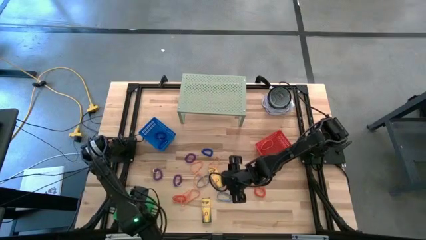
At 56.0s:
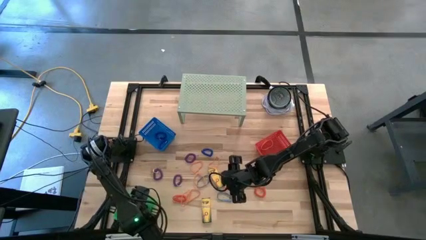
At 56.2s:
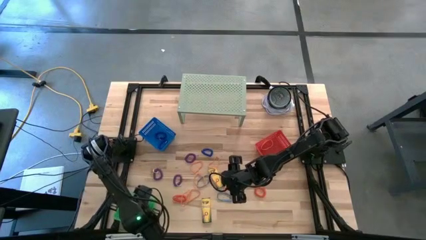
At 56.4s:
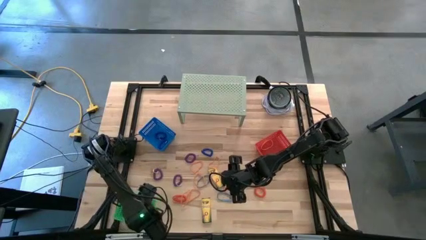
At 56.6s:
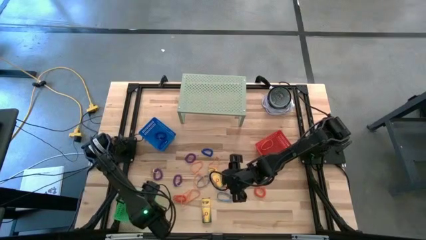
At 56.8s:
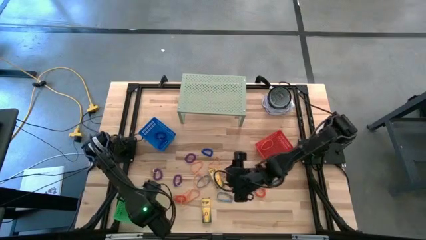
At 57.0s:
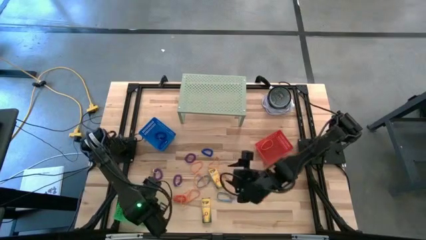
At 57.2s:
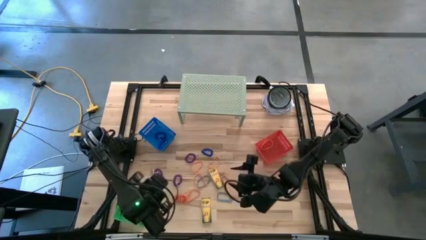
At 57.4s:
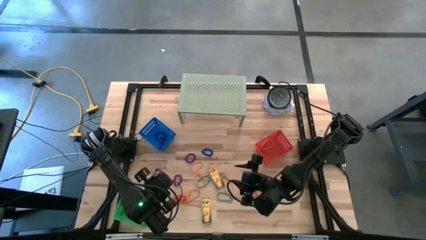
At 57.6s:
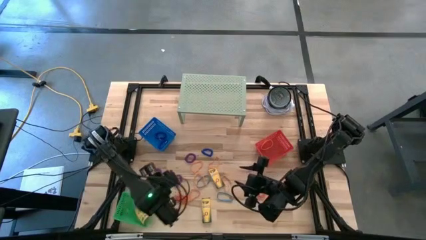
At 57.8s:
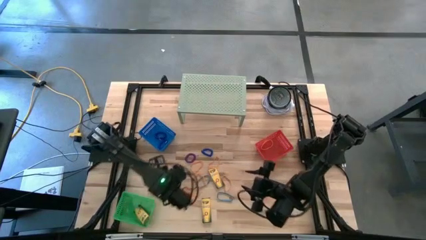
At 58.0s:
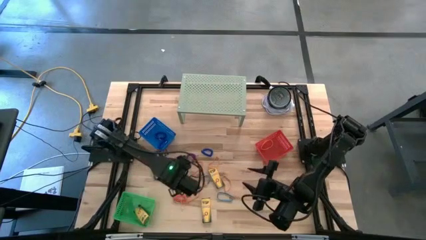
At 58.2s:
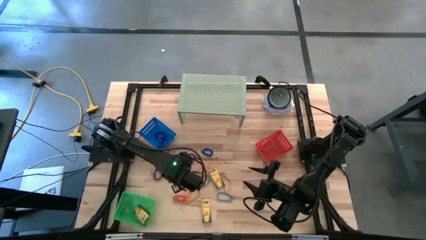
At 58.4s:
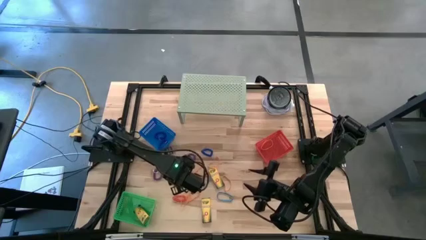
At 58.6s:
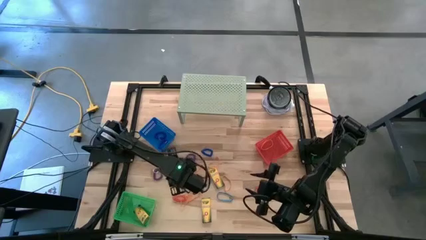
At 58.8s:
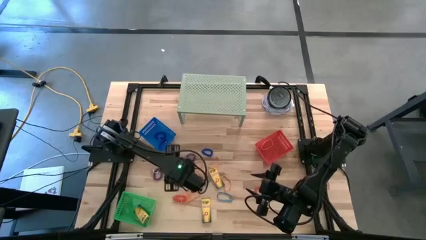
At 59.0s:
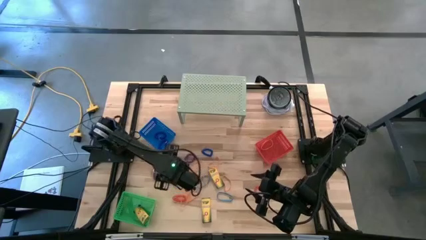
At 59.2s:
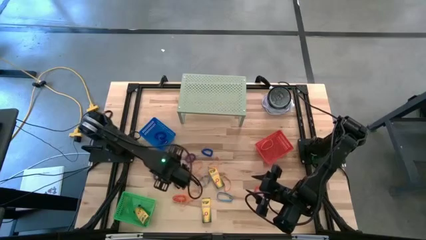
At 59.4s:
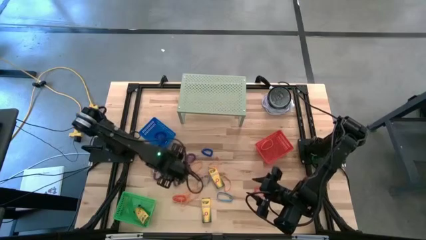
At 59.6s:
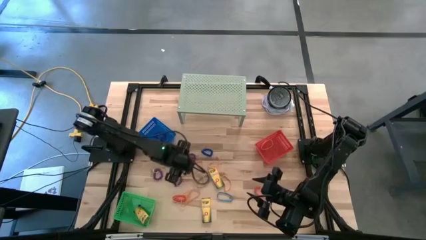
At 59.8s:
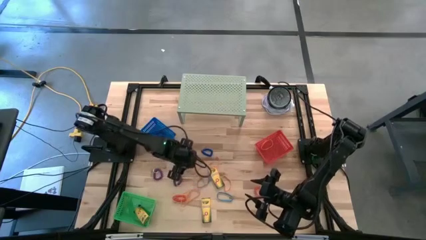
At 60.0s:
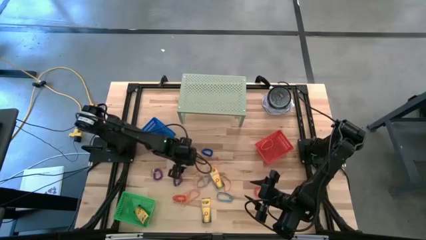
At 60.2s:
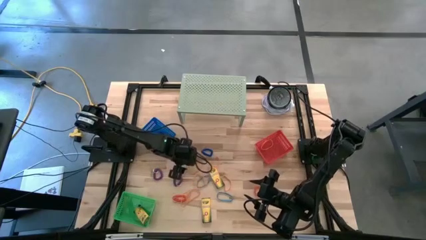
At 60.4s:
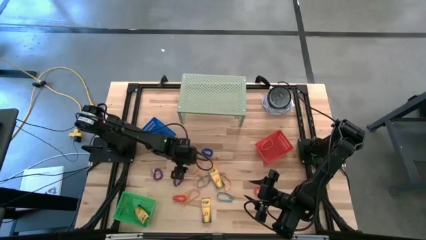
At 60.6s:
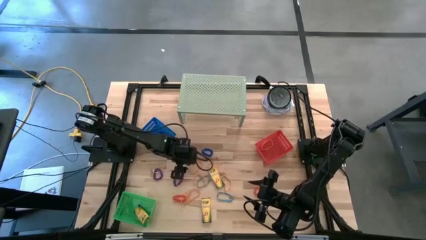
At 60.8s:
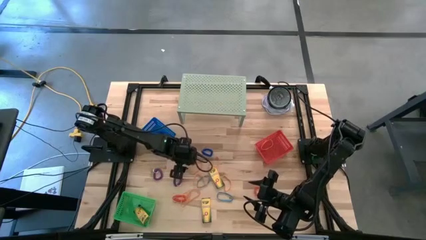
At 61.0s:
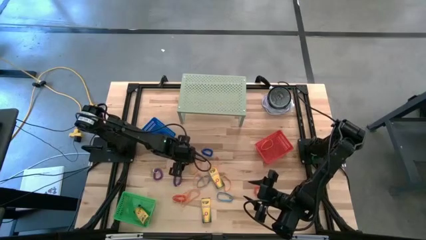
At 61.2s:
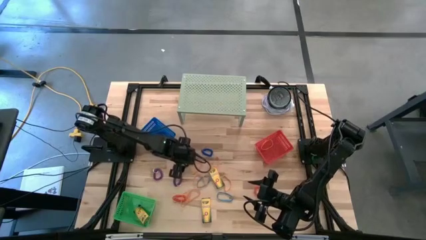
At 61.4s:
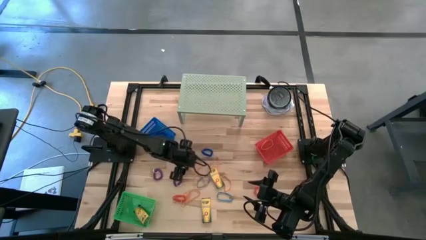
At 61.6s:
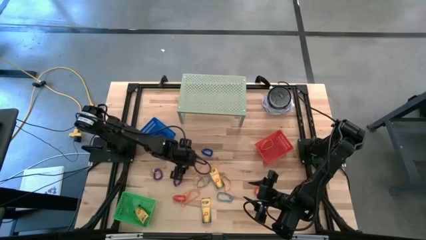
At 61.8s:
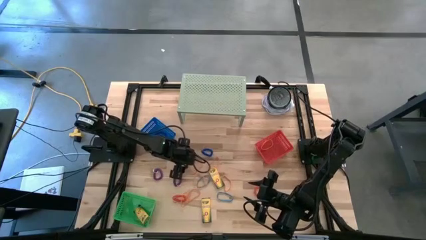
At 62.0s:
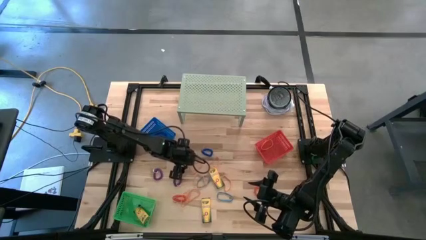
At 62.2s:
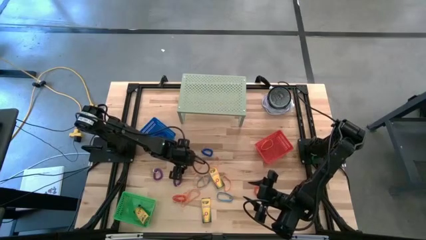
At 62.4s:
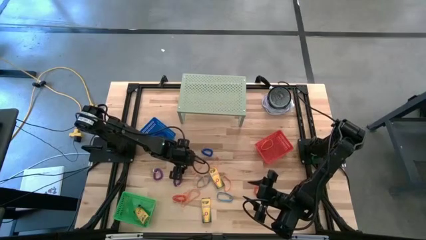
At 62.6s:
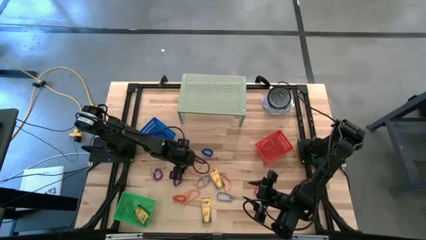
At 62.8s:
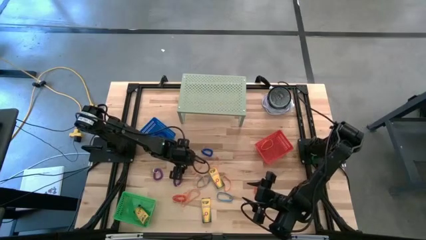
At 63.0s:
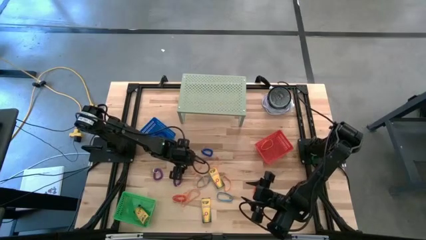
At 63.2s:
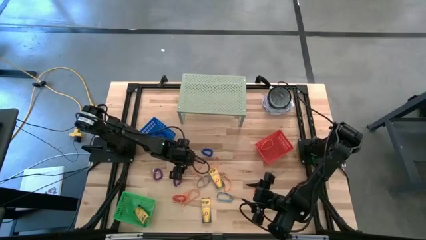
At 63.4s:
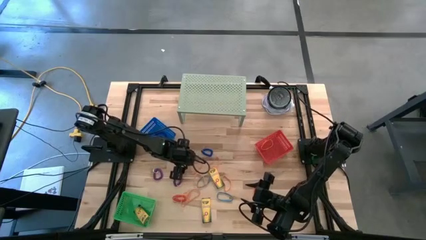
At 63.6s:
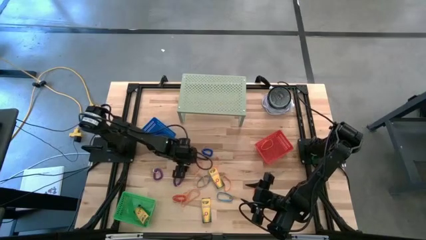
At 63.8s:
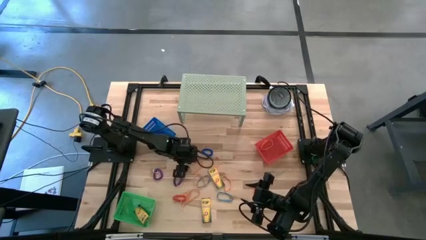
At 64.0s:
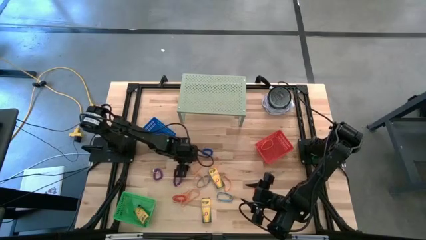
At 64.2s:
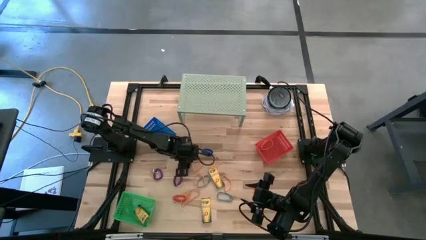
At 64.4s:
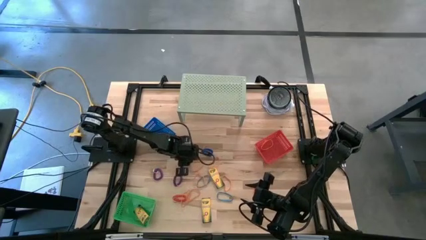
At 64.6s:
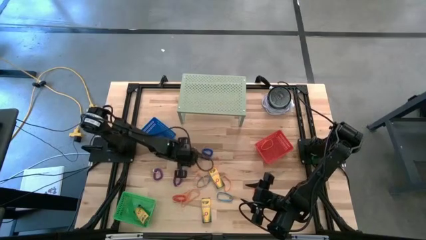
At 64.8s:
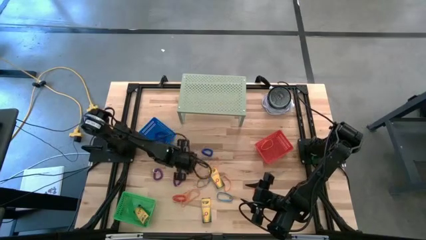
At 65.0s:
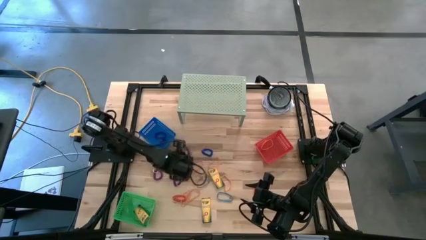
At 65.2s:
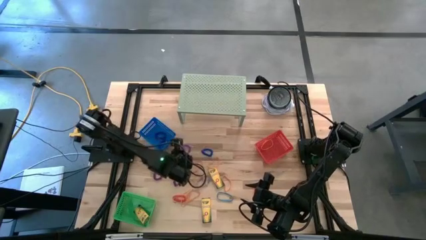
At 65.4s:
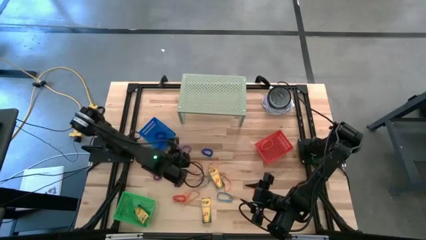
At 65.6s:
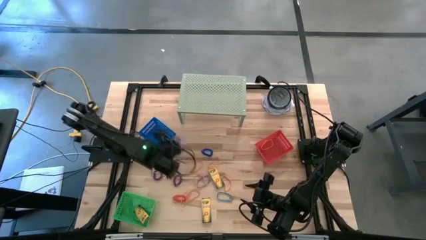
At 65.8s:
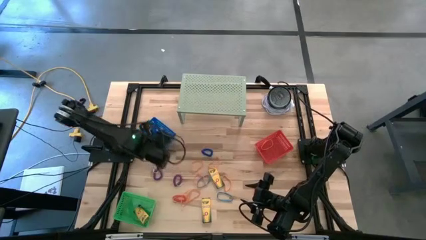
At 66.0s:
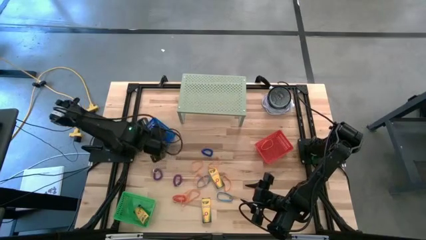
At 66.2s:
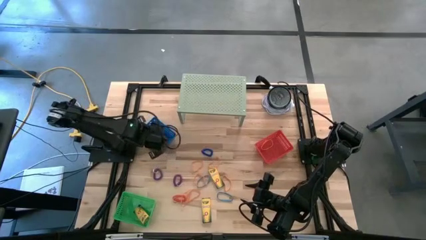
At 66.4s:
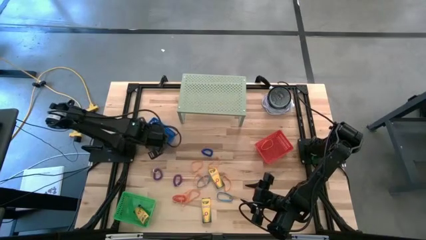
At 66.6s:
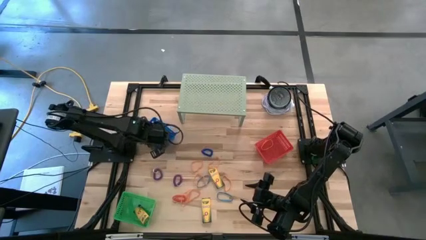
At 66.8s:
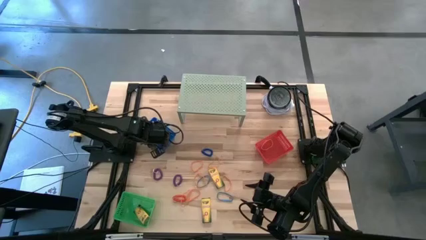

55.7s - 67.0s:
Task: Pick & Place Office Desk Supplies
Put the purple spring keychain into the blue bin

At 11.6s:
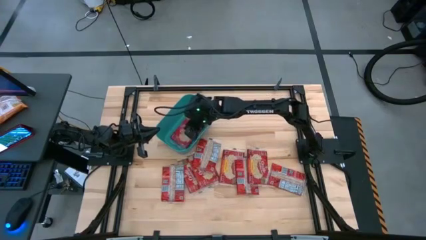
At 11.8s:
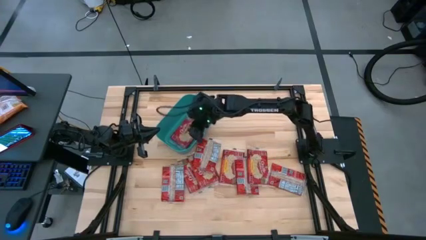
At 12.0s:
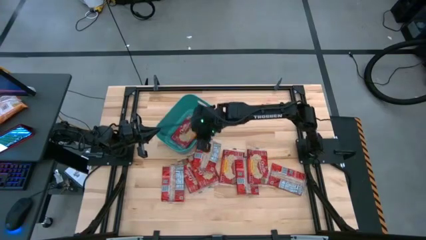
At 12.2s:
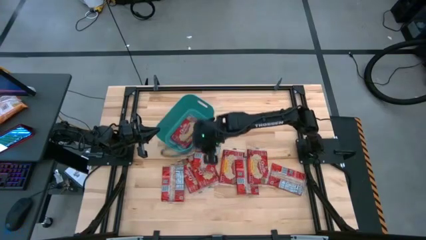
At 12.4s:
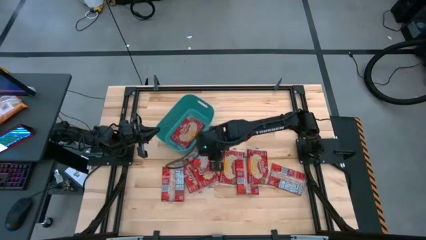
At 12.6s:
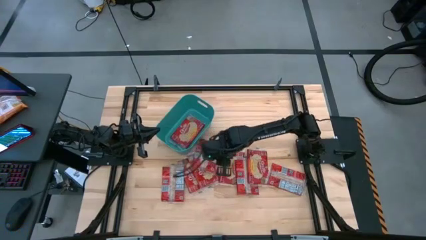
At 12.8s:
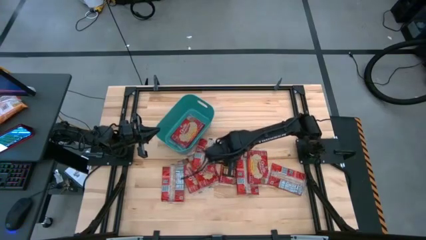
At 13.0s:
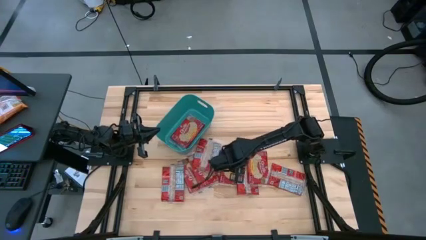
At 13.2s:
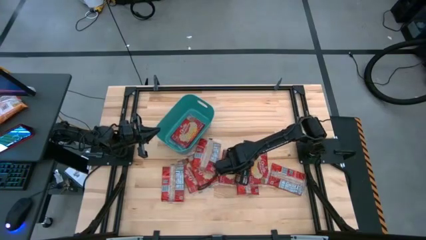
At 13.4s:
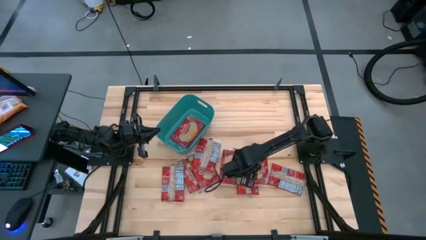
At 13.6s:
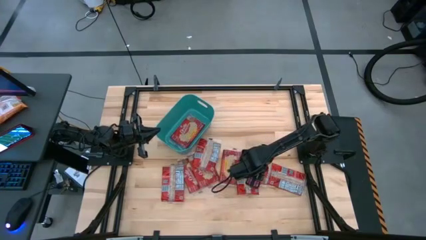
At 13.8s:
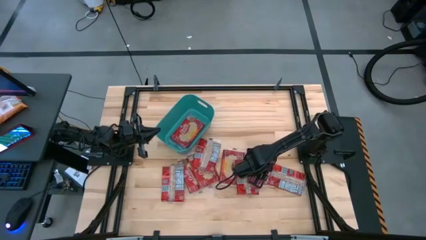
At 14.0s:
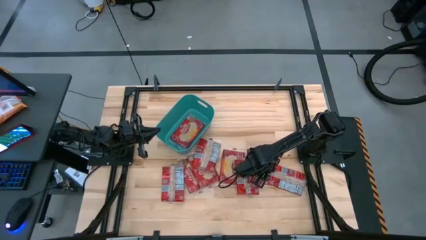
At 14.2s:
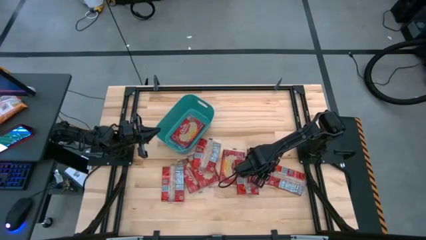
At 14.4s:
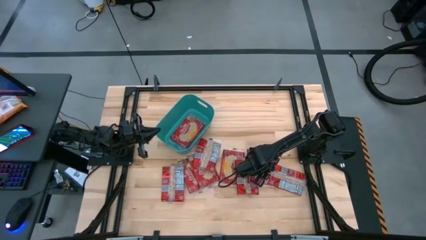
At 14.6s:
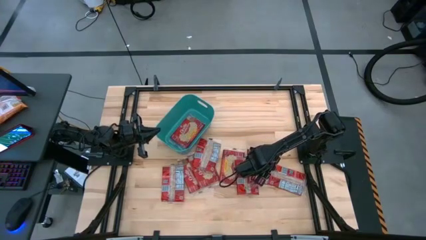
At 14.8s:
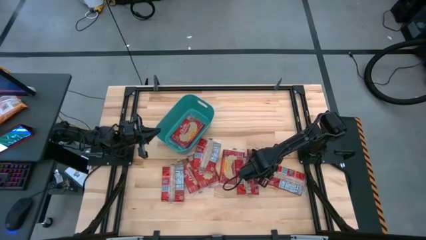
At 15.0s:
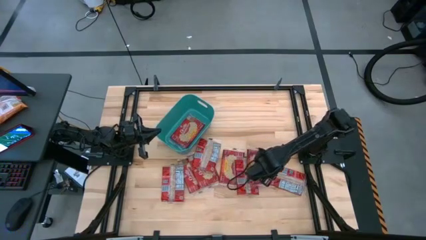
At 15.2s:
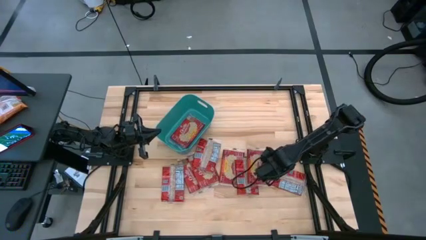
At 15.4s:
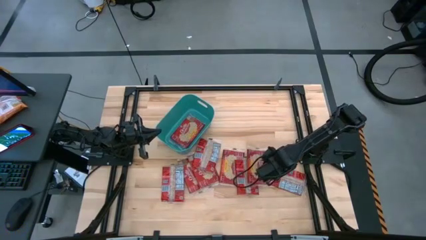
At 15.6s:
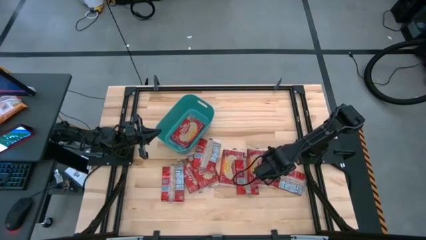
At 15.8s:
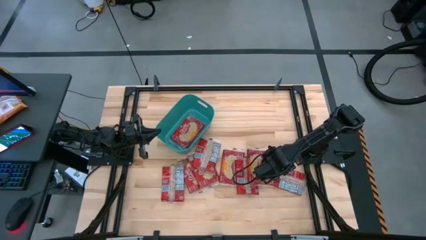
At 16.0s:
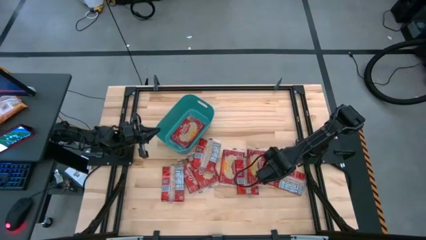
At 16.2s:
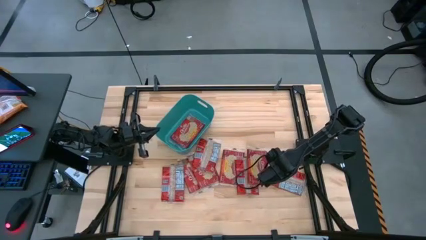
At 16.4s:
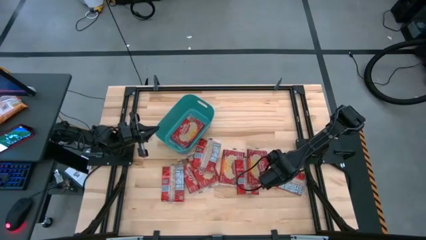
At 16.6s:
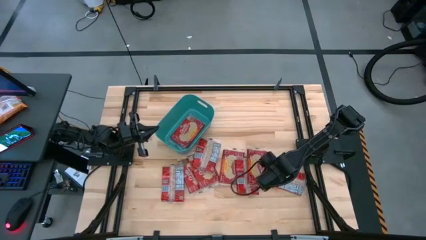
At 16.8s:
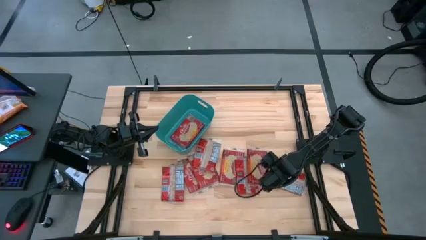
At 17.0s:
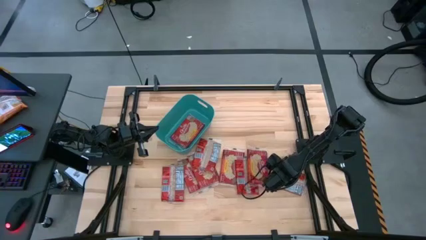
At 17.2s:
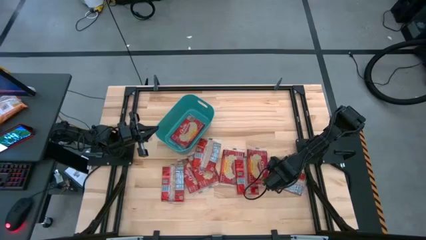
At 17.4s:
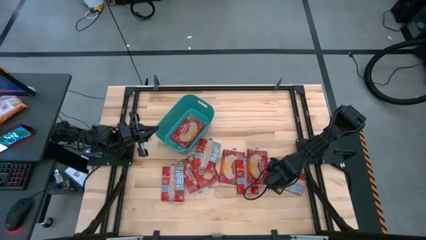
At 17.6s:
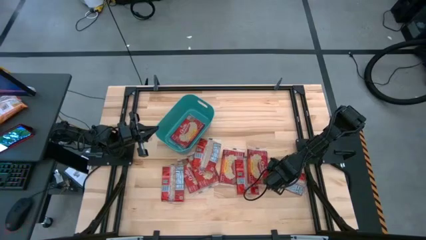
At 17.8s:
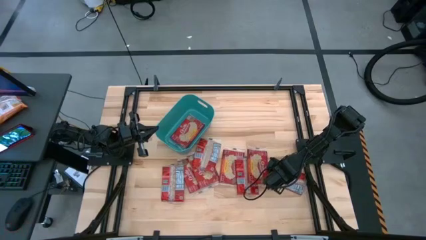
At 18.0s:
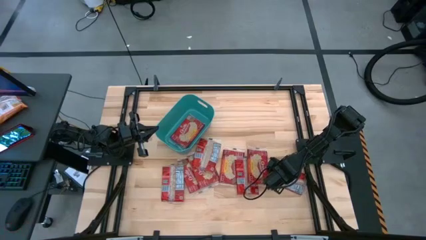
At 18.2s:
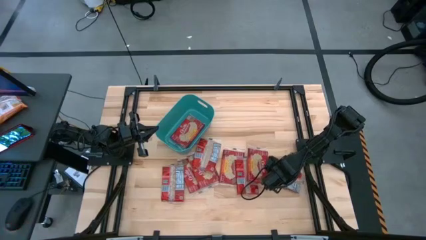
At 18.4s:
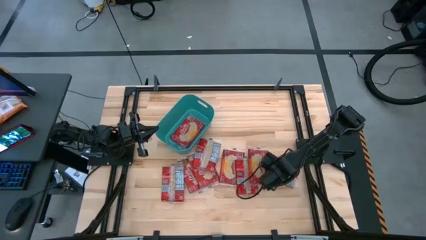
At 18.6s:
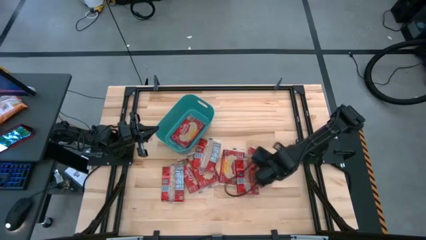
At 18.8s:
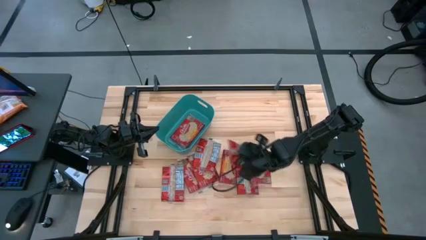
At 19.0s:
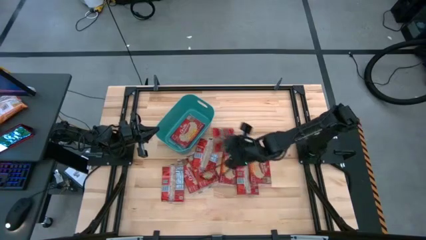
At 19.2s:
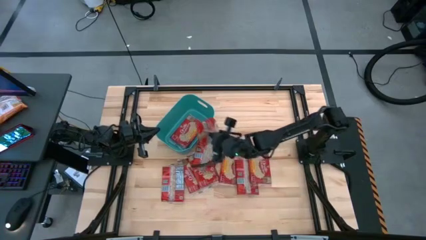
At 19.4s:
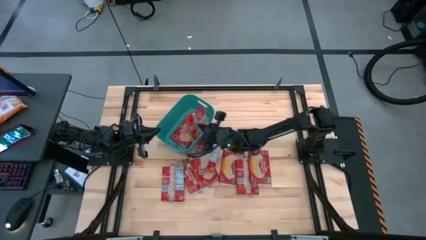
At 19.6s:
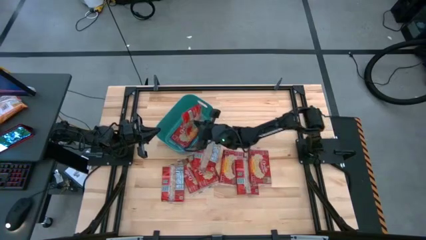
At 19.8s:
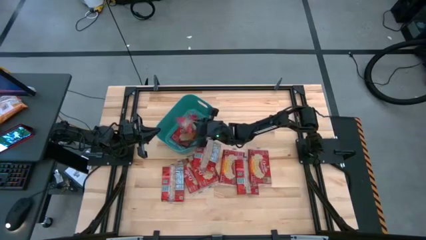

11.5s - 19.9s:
Task: Sort popcorn bags into baskets
Put the red popcorn bag into the blue bin
